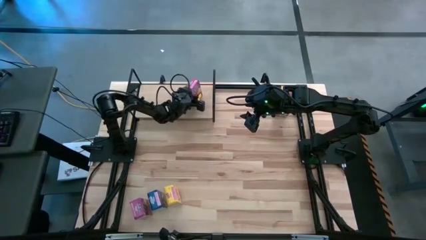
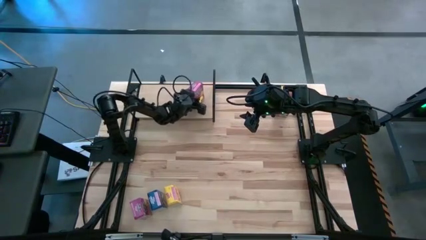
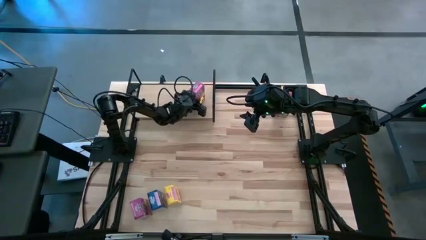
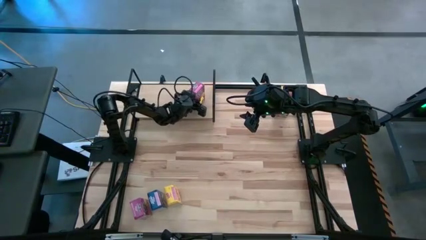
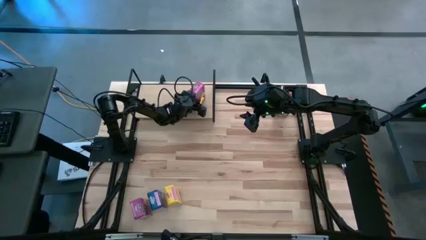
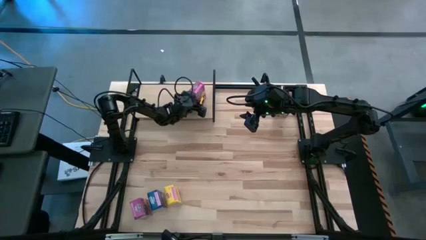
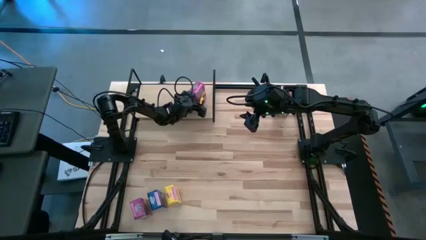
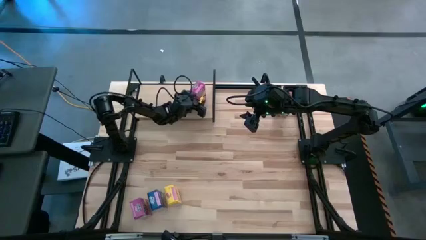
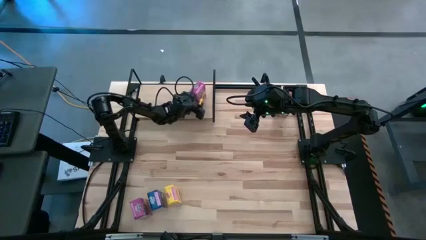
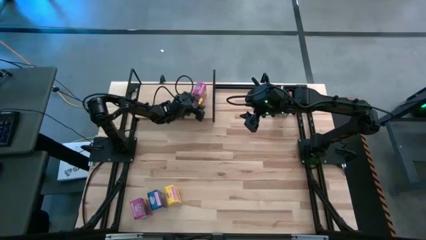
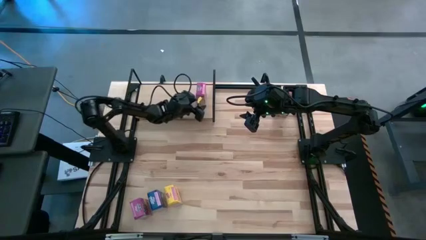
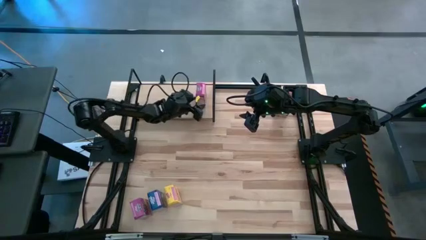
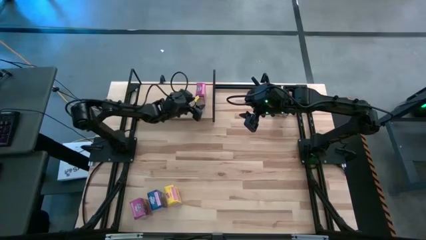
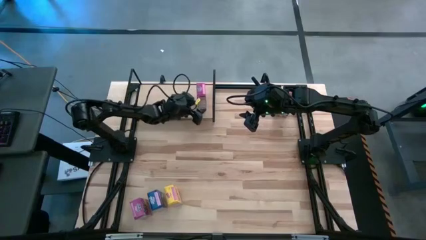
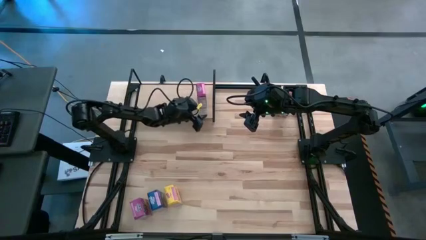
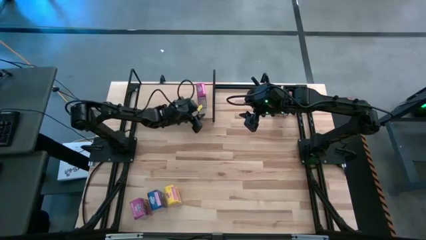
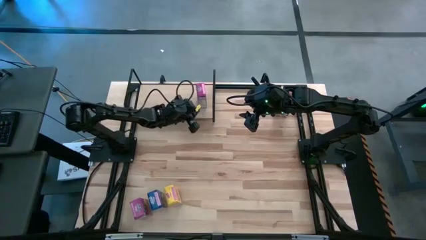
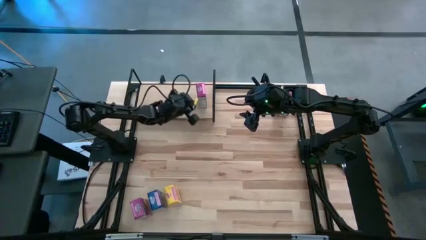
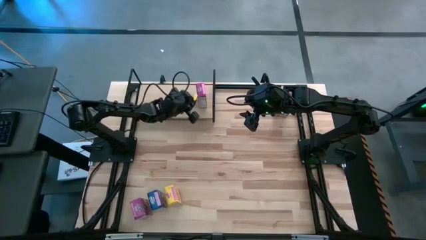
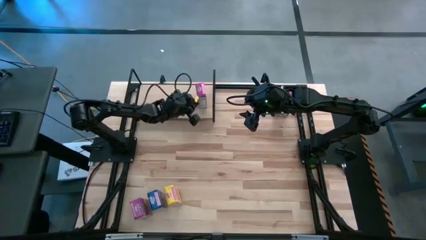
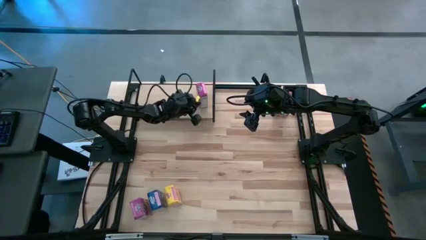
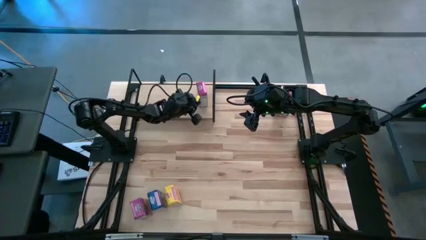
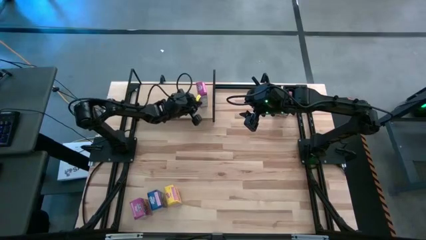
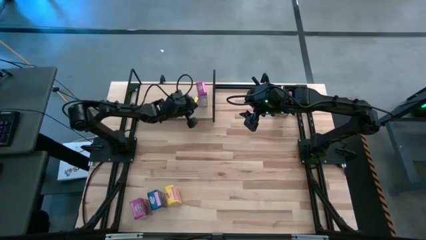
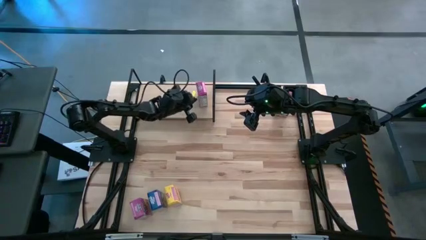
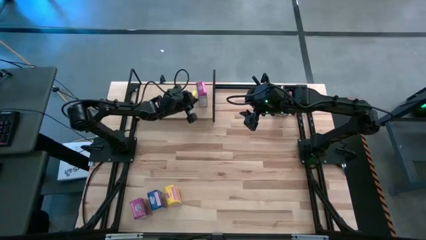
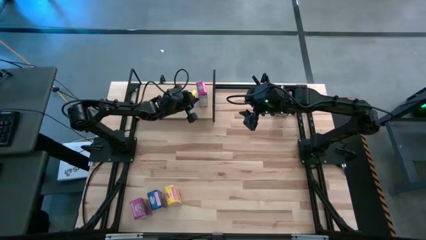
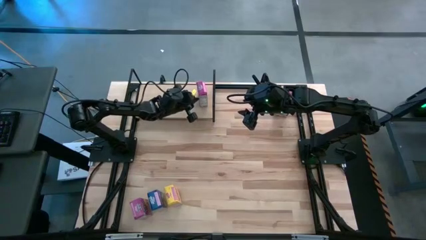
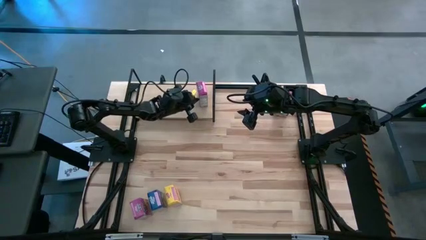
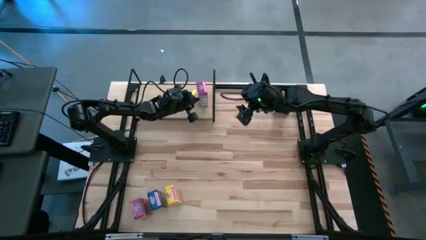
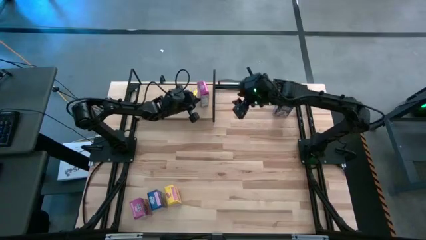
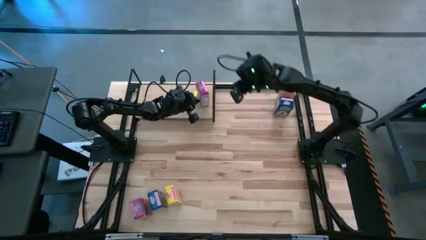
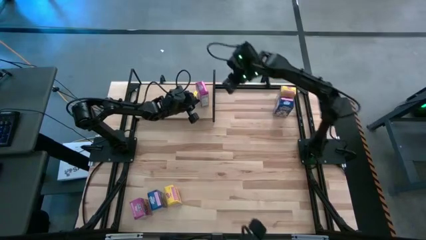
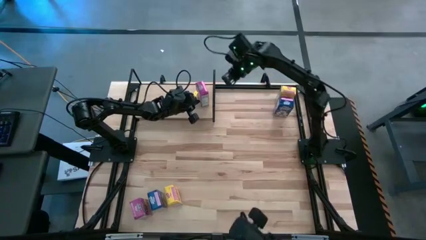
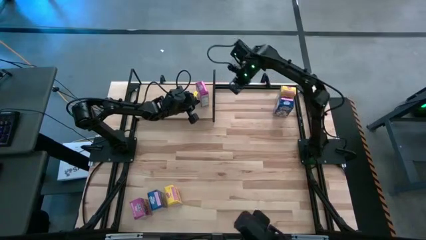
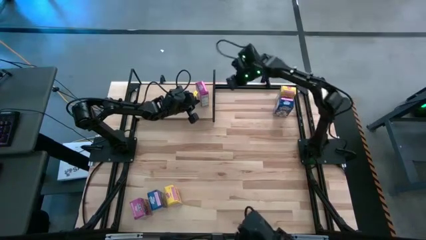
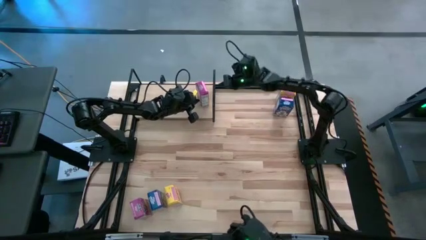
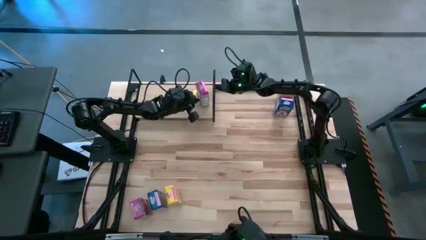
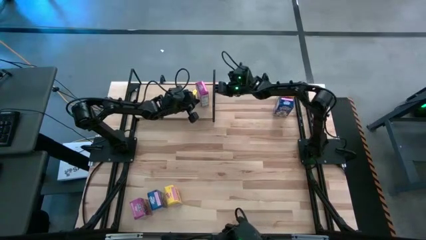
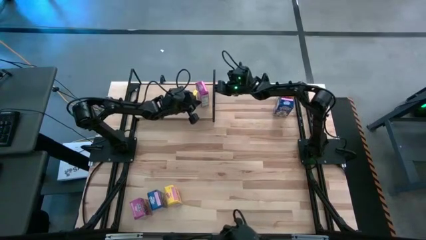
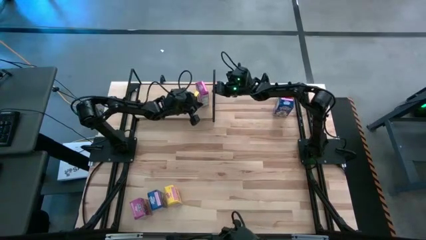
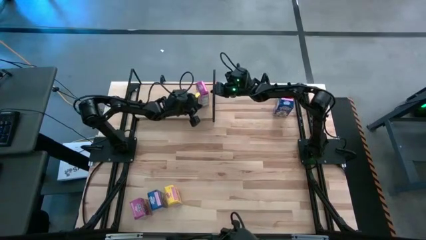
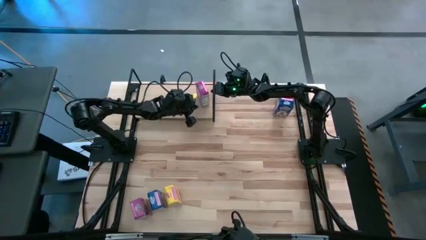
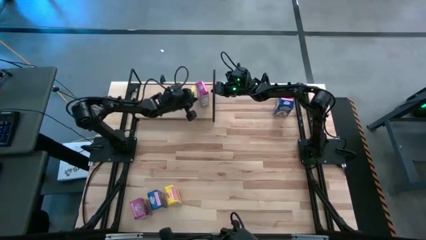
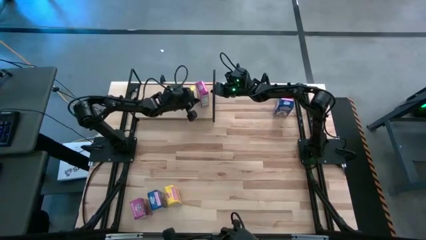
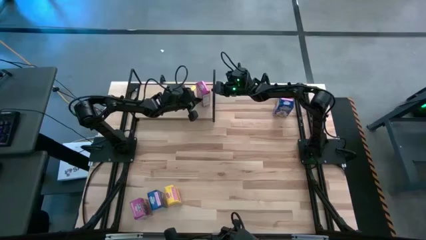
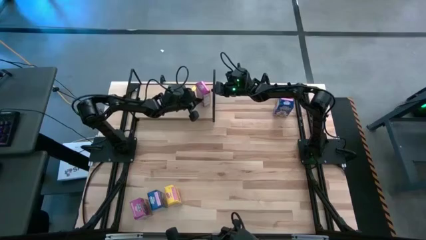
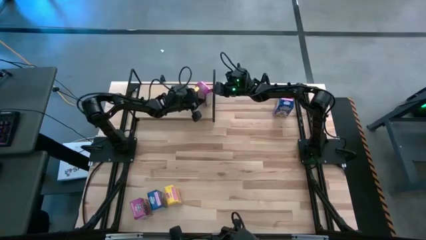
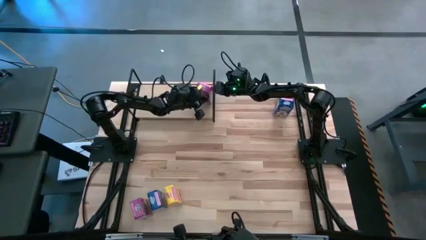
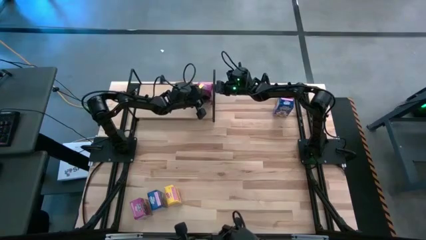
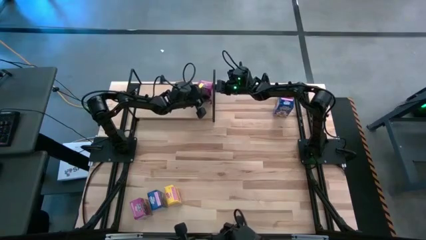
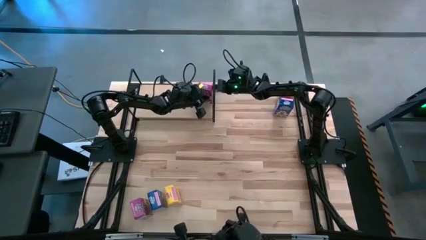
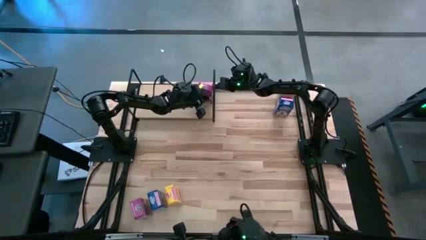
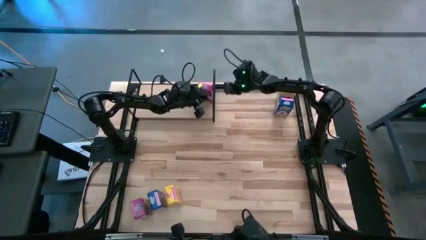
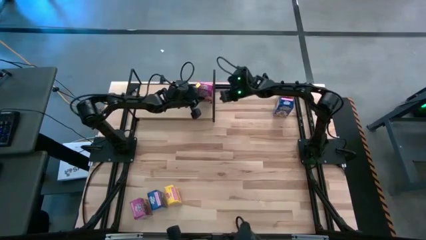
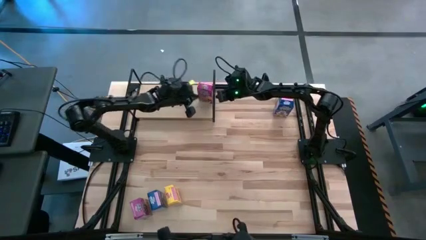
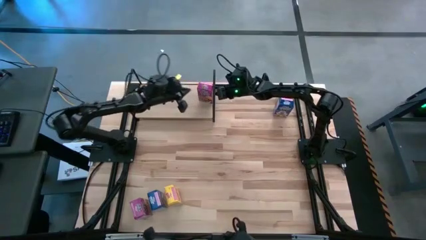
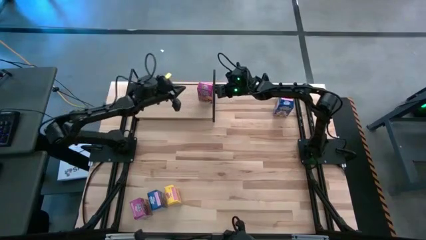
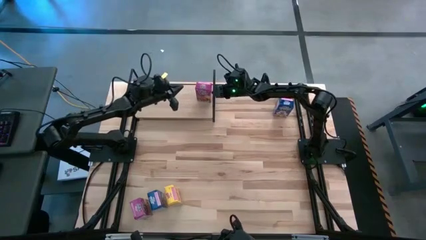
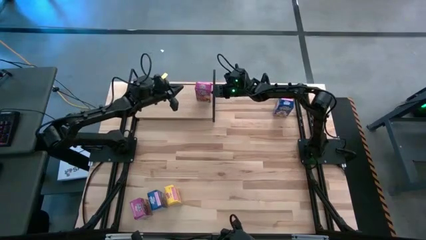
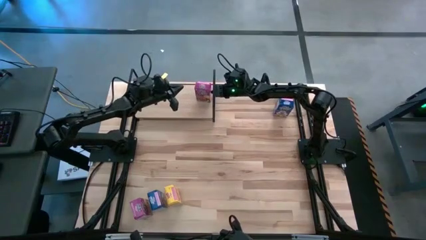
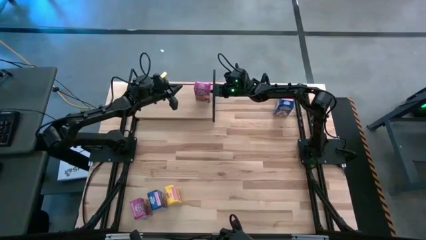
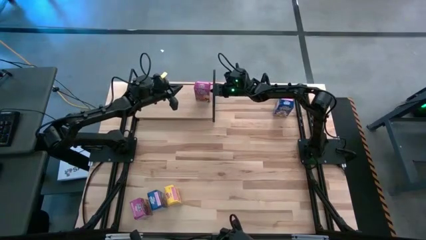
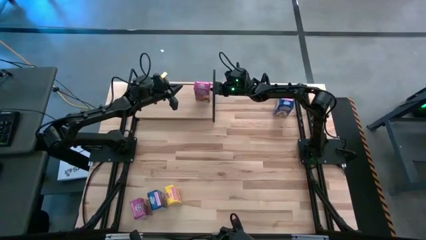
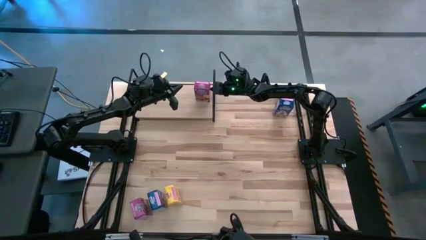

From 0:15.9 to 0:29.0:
Task: Stack cereal on shelf
Put the top purple cereal box on the shelf

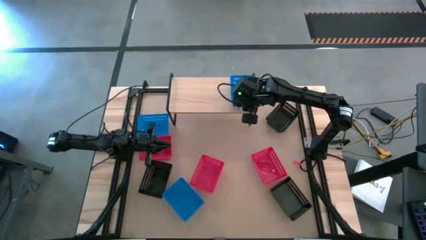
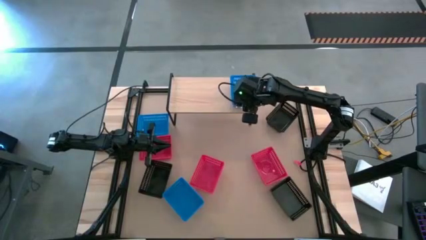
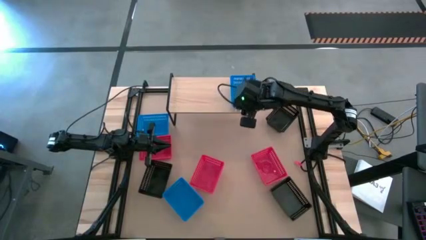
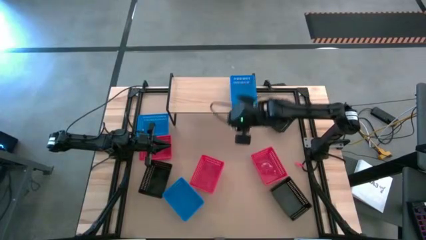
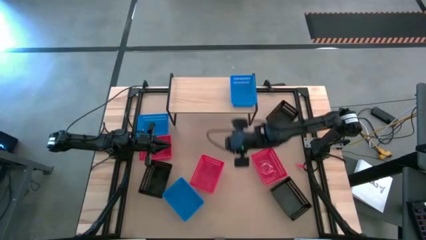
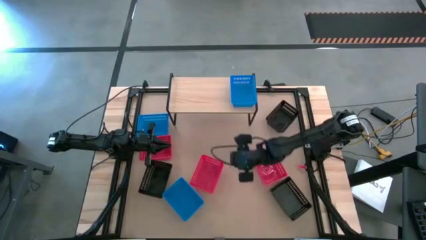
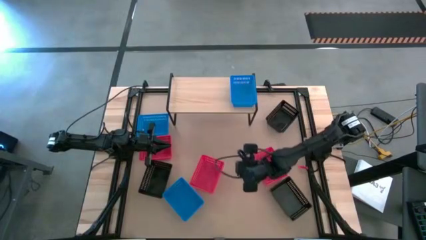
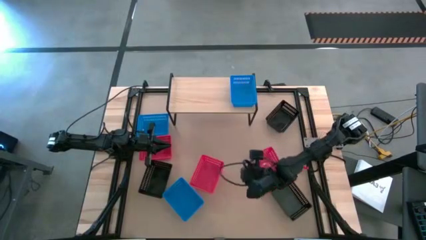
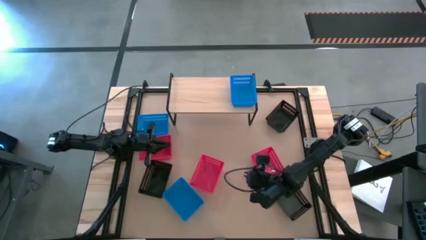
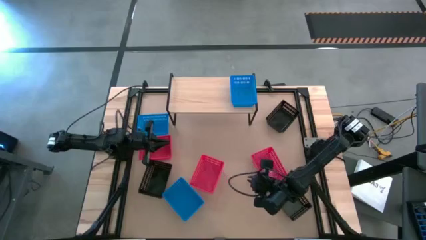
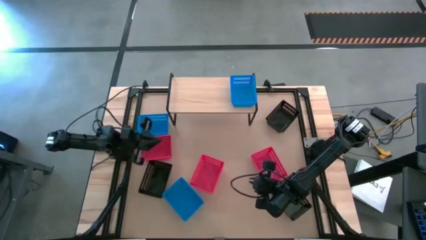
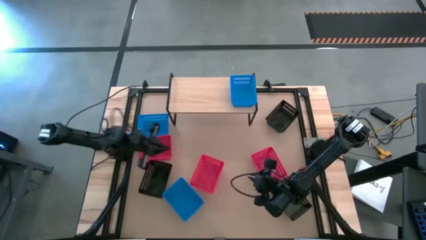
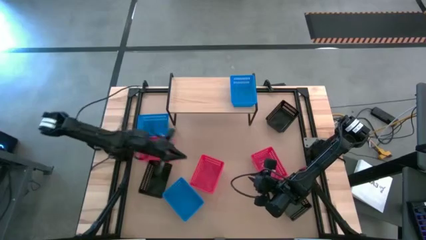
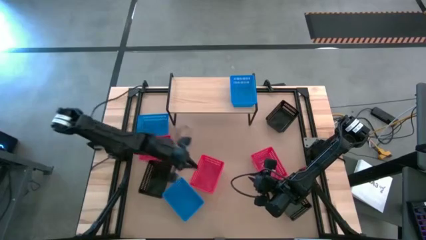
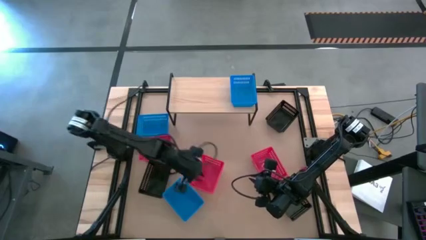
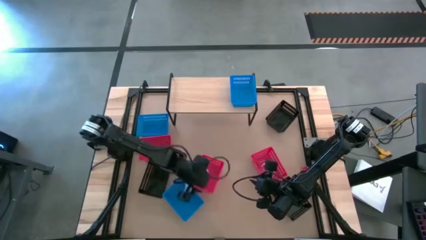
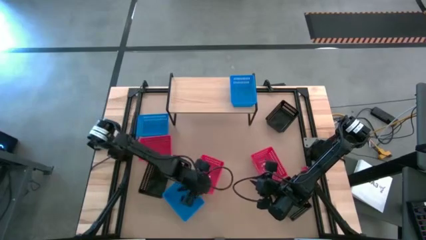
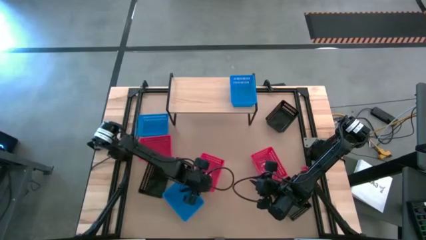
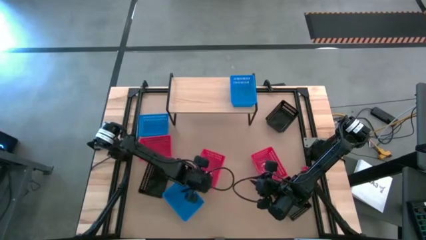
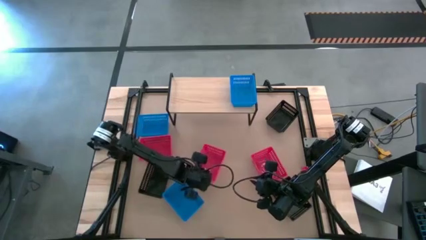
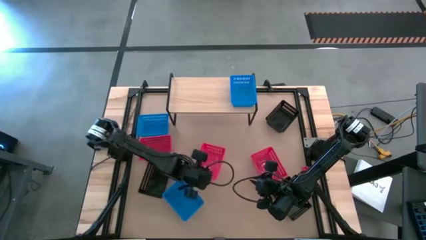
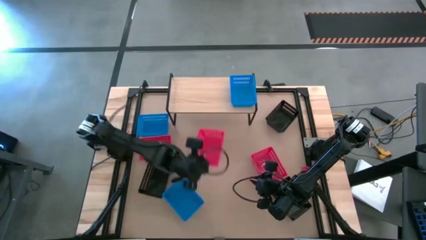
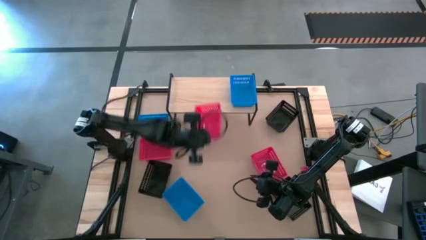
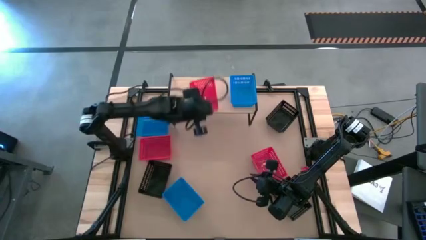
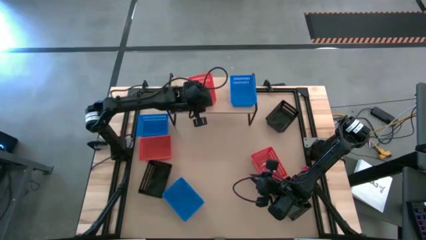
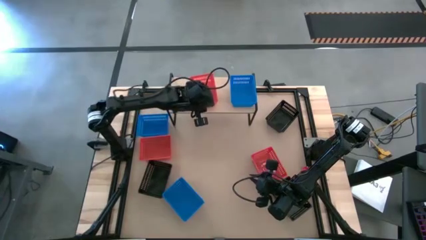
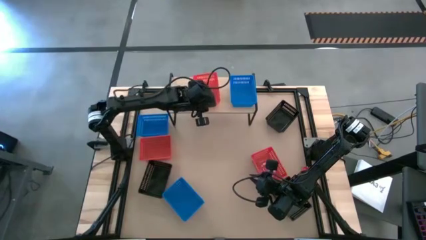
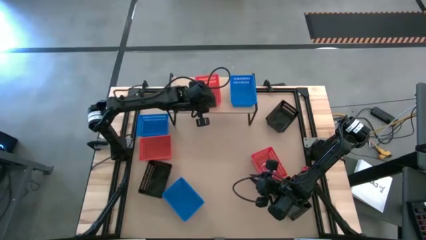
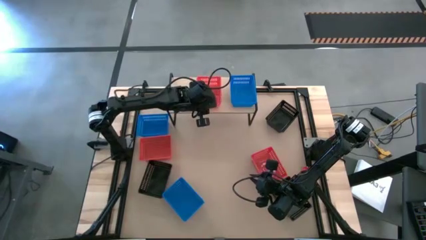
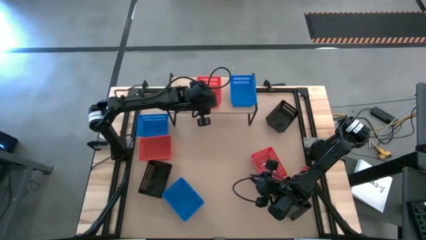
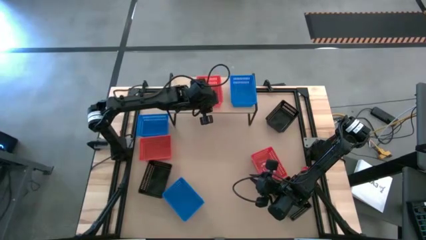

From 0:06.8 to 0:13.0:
Task: Stack baskets on shelf by color
Put the middle red bin on the shelf
